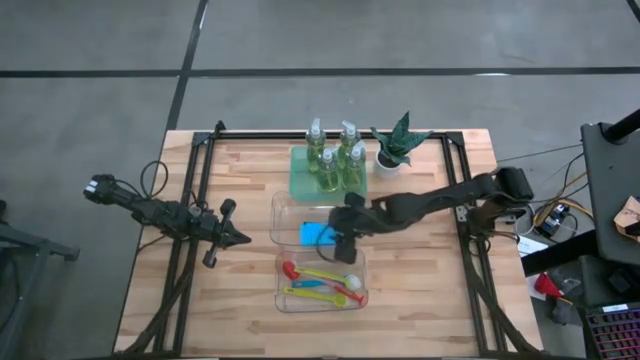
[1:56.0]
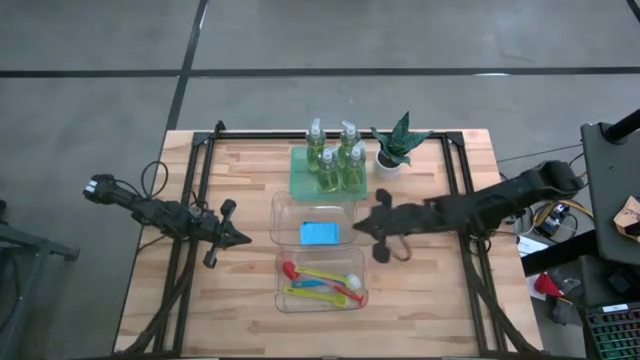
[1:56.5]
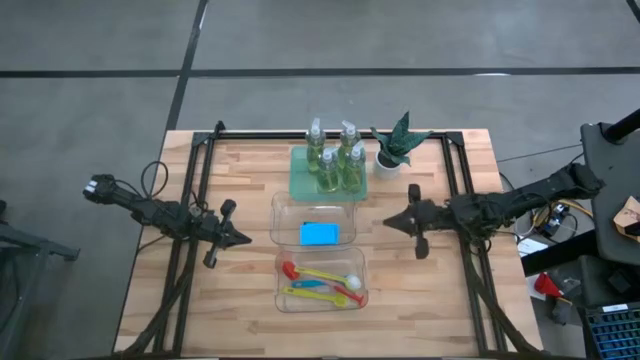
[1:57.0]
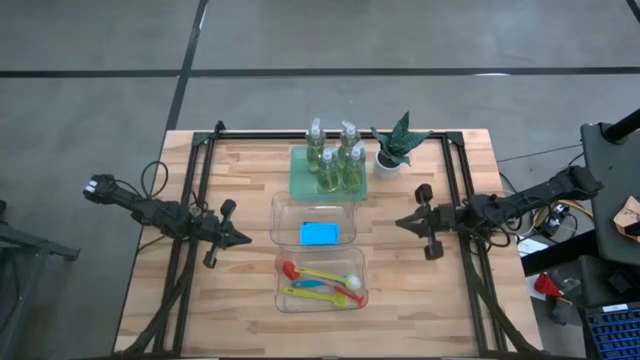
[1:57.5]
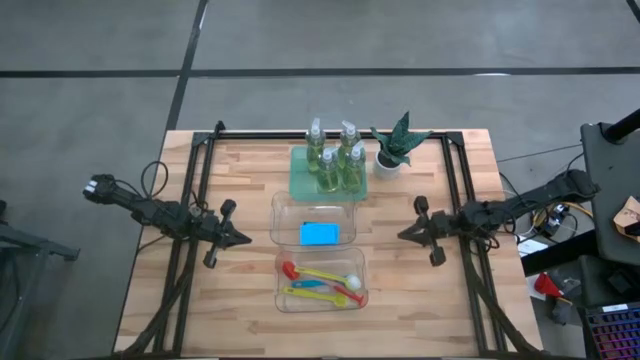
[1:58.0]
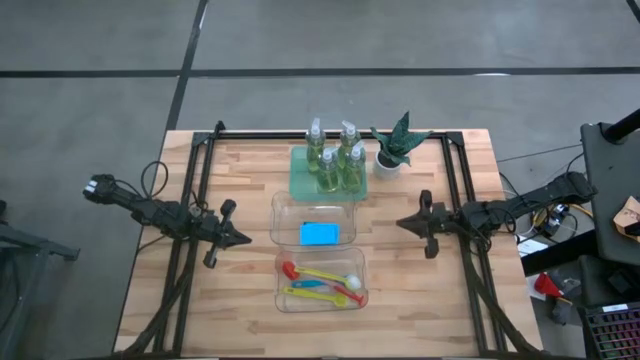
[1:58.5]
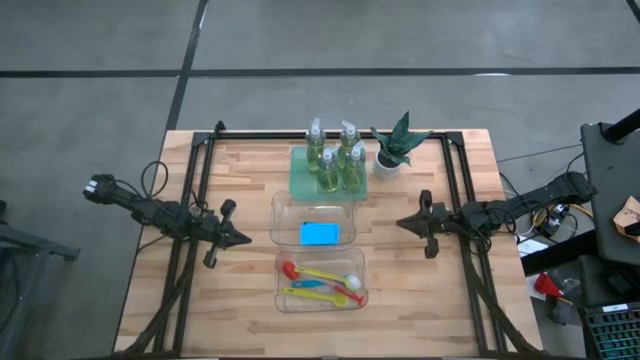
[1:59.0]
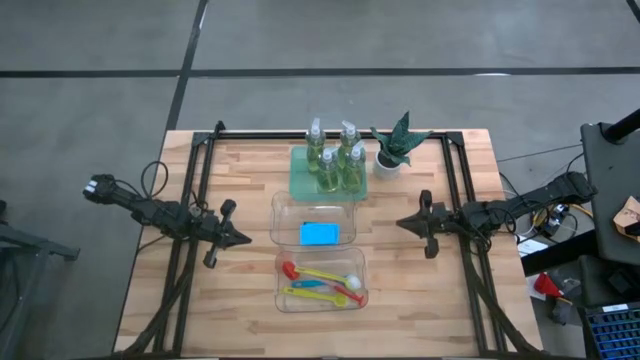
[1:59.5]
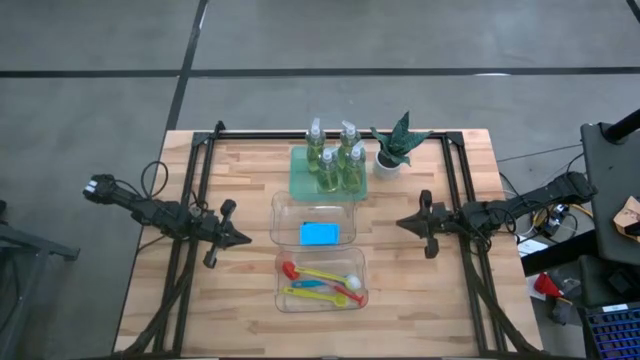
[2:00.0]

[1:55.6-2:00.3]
Task: Pick & Place Kitchen Sink Supplies
Return to Home Position

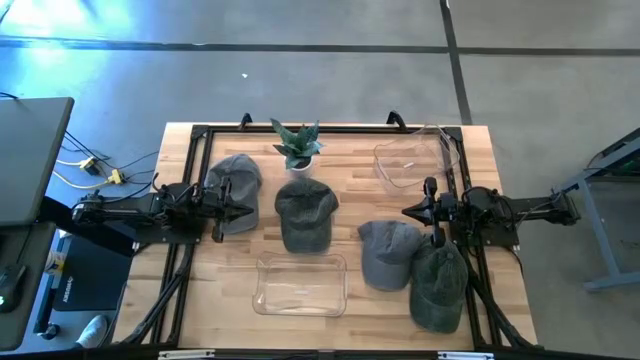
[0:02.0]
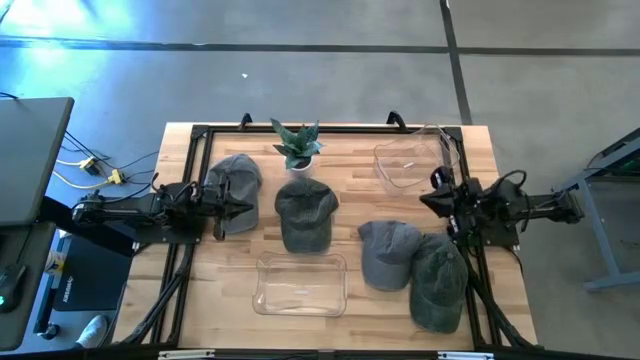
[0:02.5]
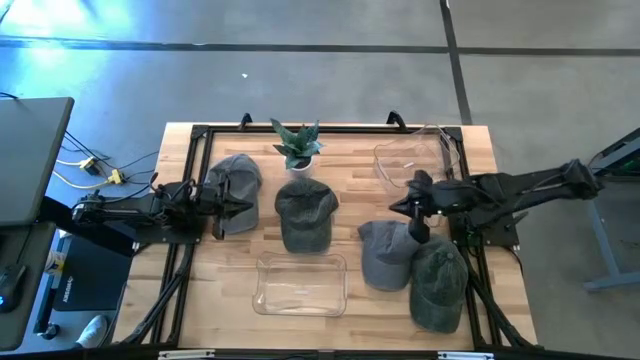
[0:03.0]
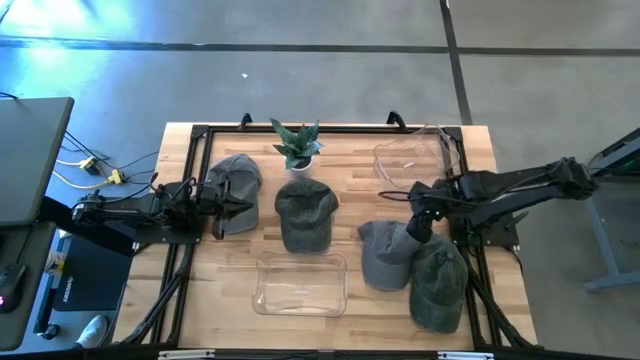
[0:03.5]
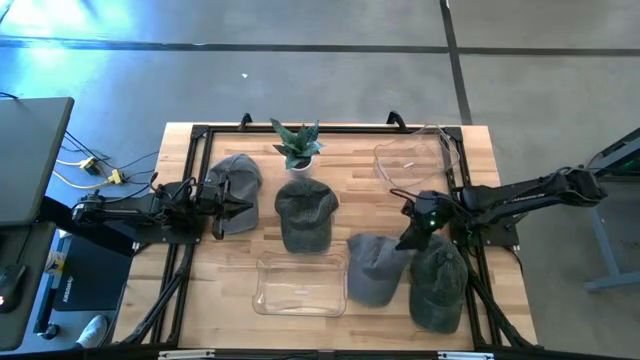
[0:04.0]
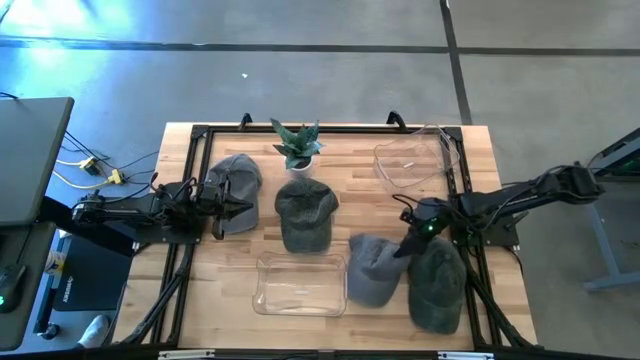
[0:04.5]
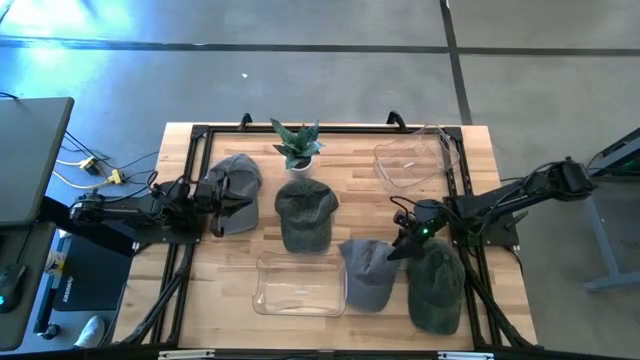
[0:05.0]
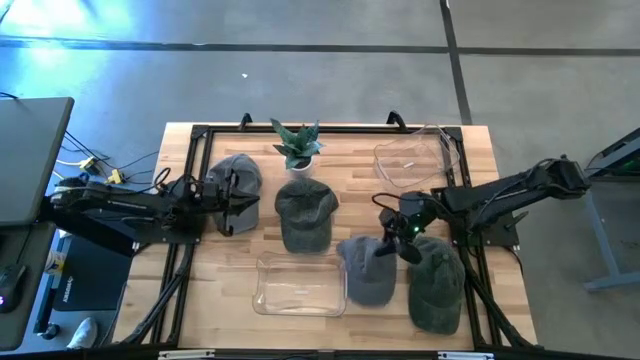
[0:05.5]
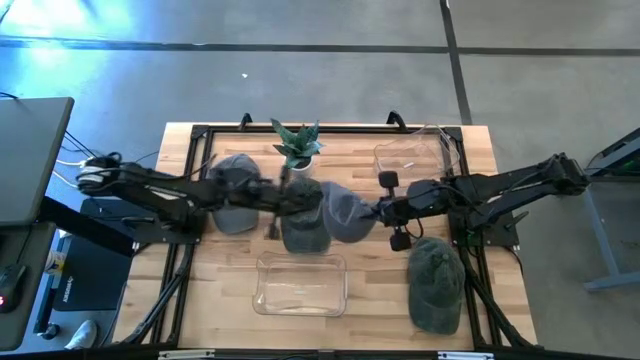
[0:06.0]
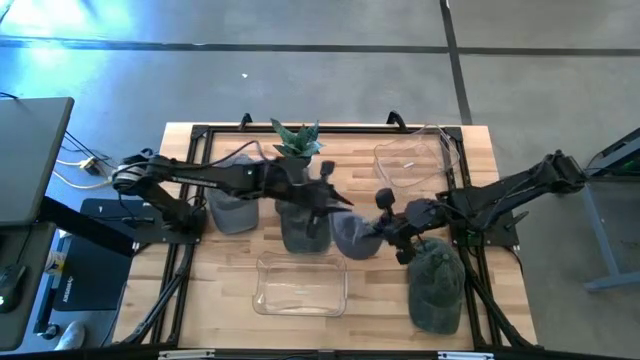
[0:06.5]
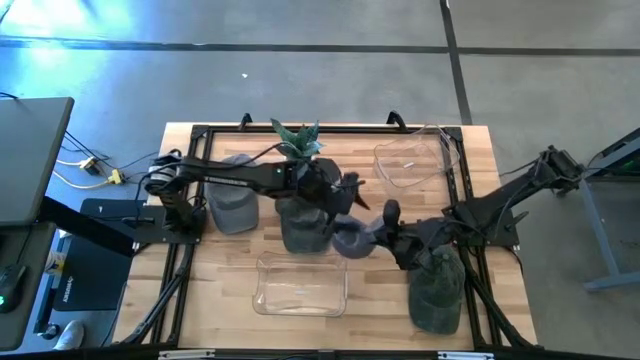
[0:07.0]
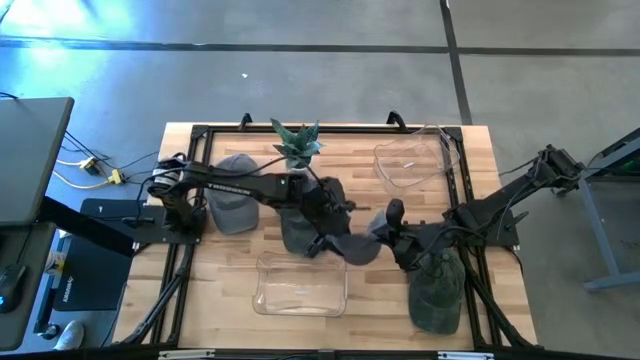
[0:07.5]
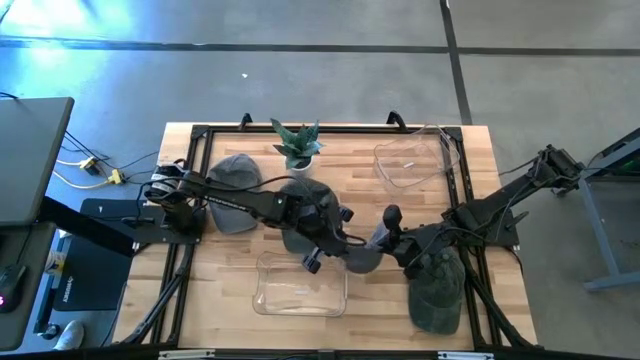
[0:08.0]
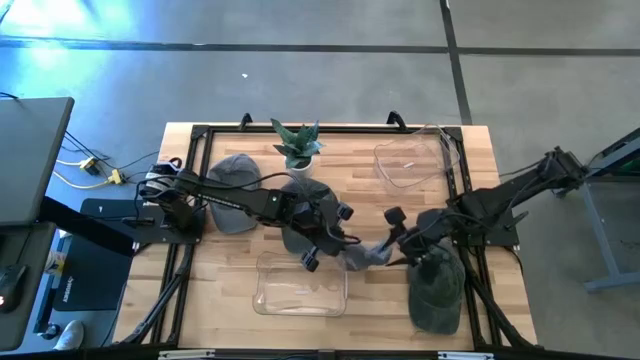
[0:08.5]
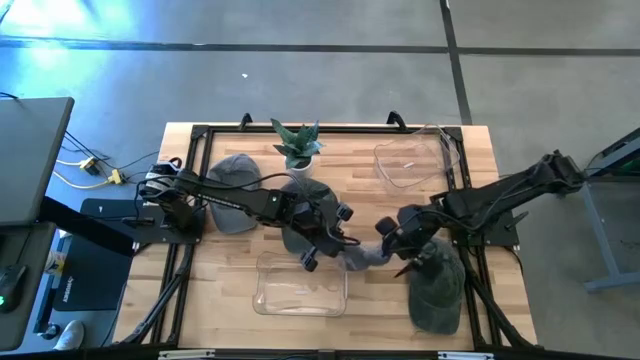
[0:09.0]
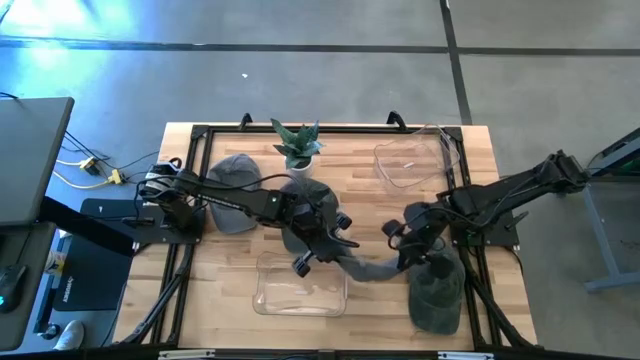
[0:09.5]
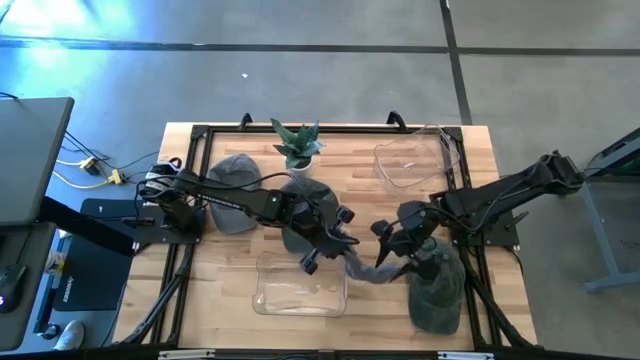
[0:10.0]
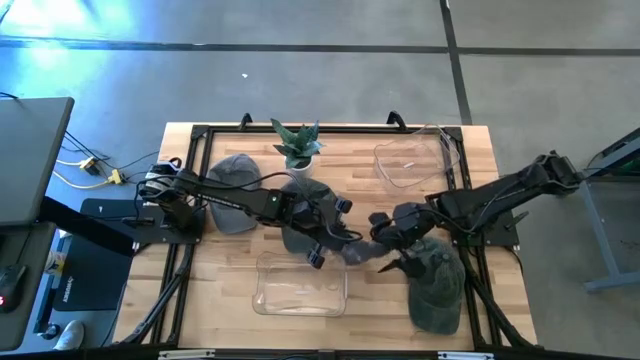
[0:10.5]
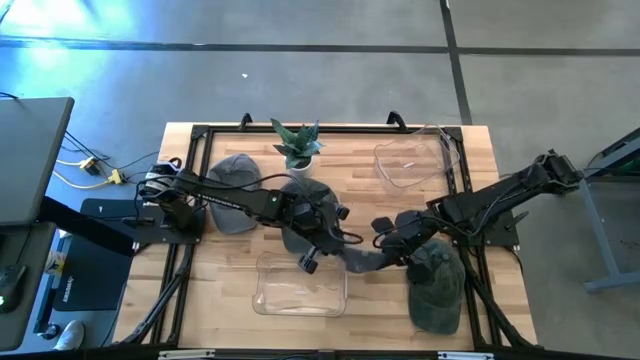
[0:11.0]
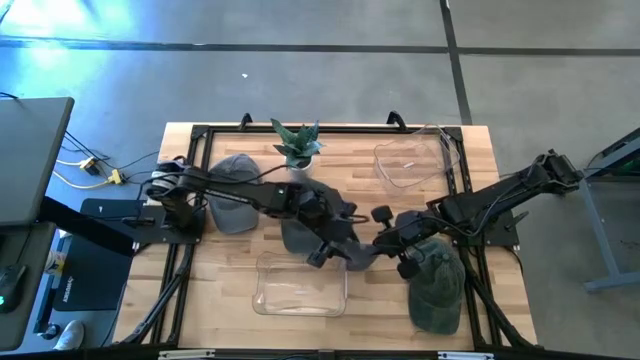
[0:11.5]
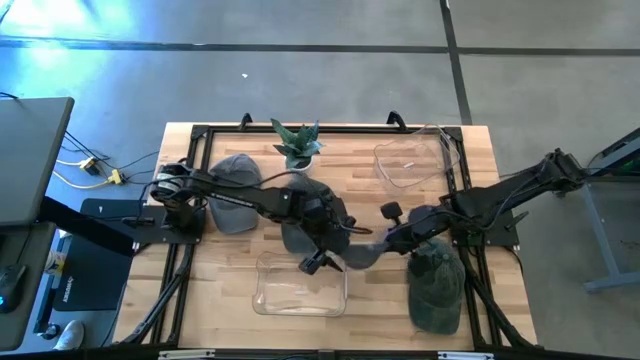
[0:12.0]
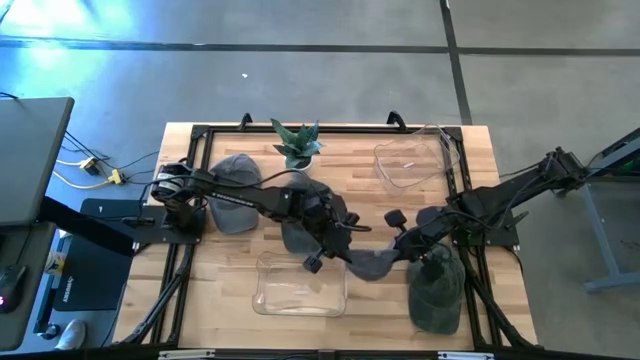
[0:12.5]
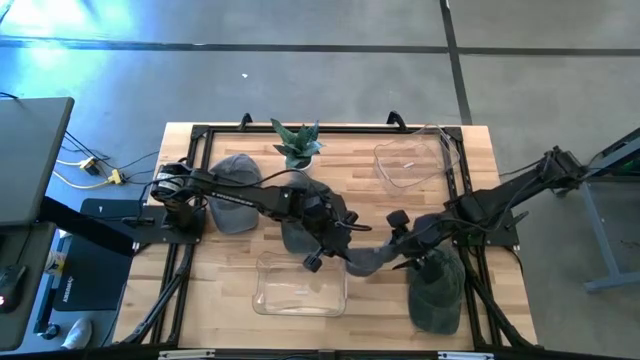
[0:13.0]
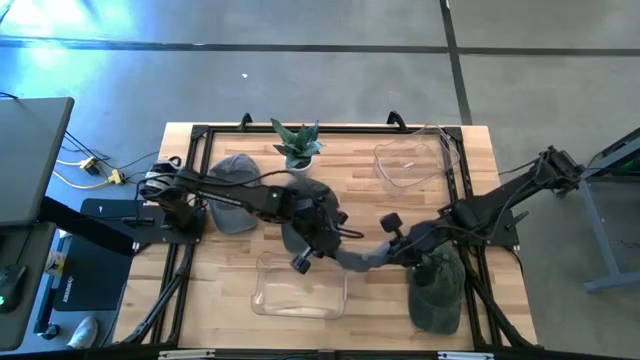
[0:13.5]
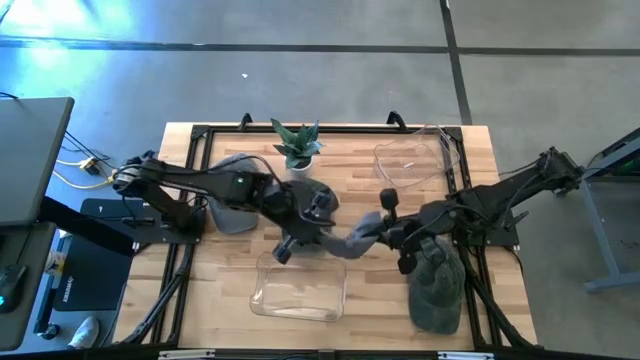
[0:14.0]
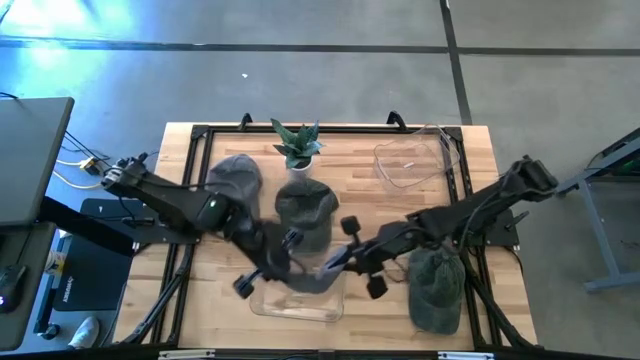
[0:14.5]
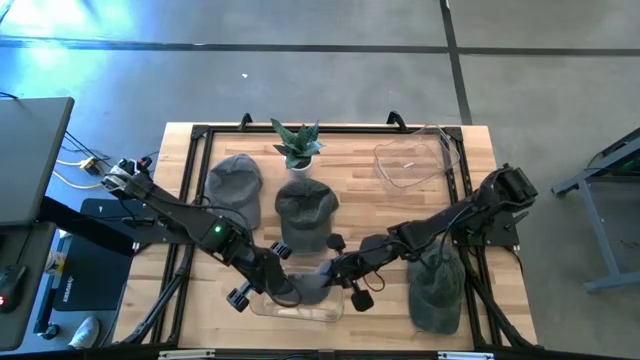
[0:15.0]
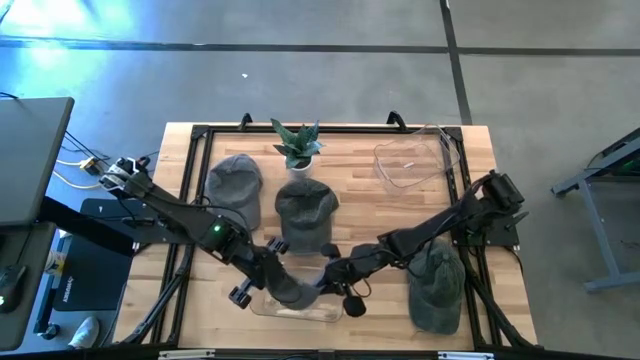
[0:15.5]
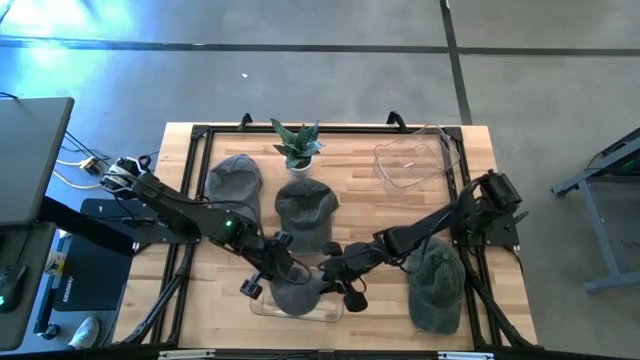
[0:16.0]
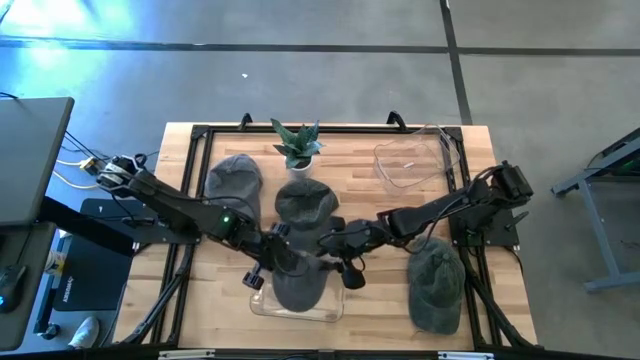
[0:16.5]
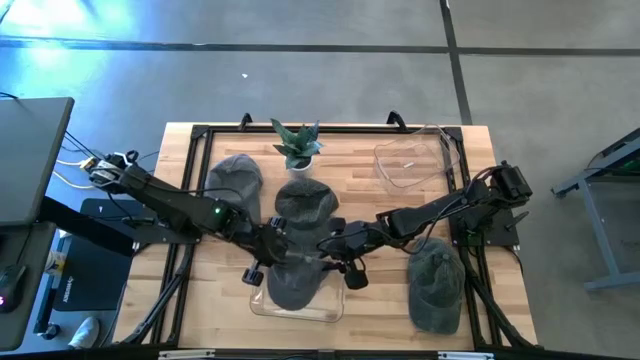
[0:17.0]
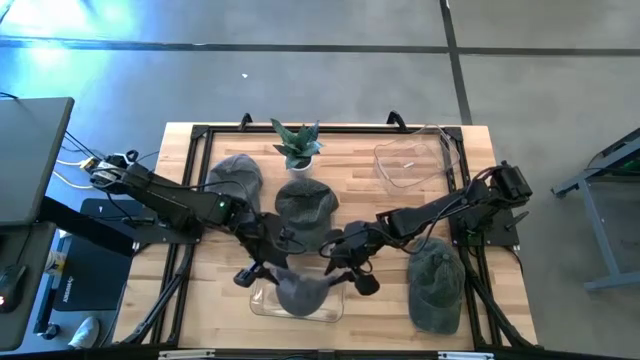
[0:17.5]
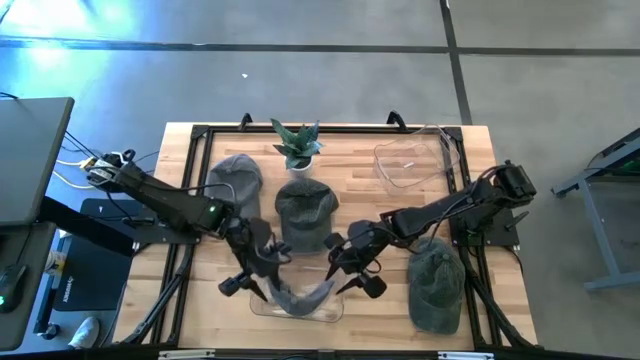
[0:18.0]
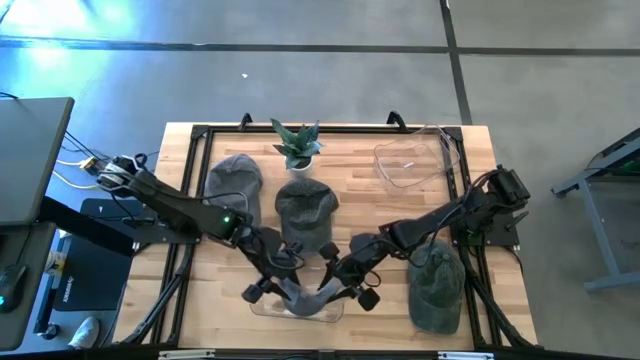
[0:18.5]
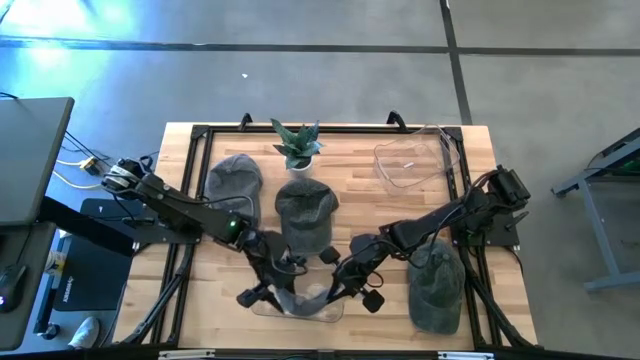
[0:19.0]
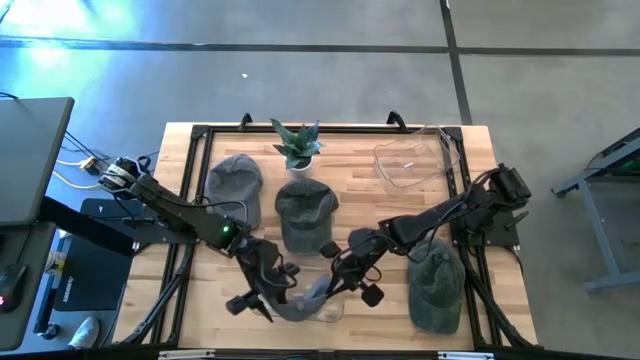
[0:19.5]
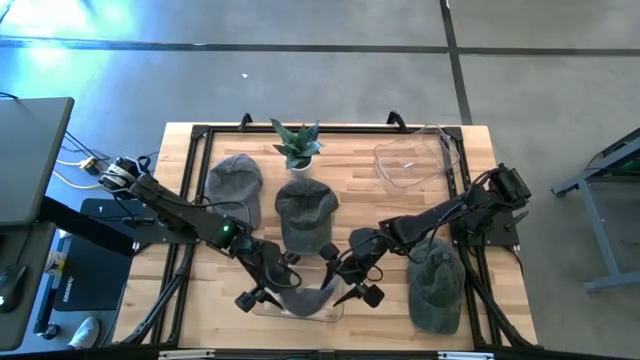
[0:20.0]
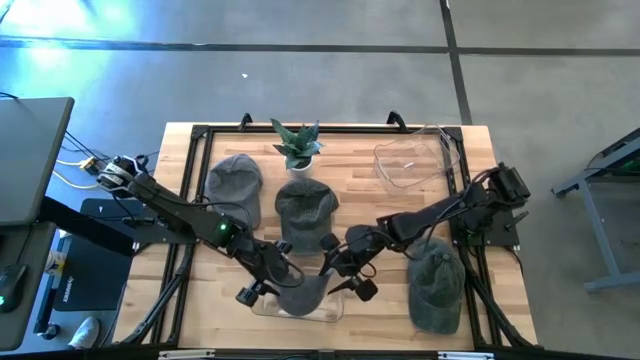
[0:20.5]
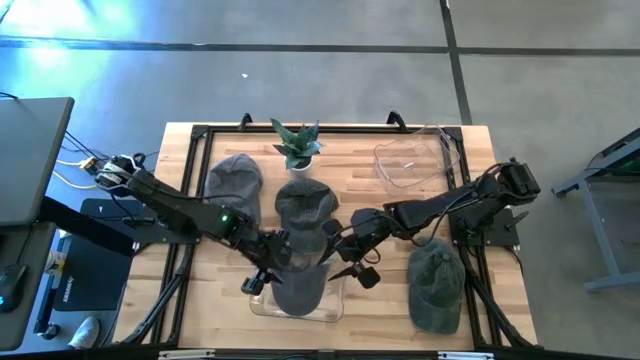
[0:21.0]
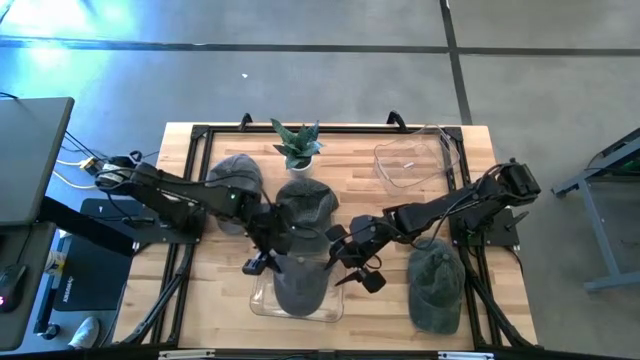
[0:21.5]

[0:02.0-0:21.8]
Task: Pick & Place hat
Put the right gray cap into the bottom transparent bin
